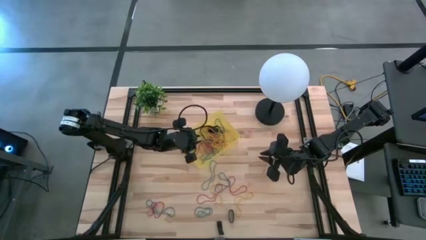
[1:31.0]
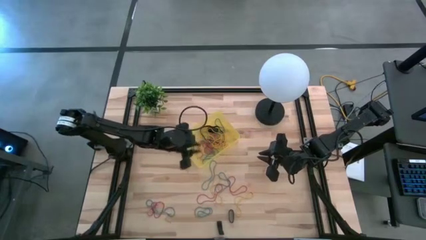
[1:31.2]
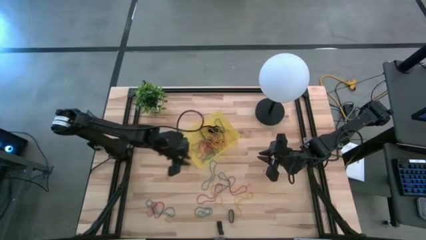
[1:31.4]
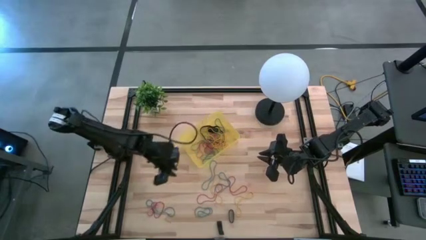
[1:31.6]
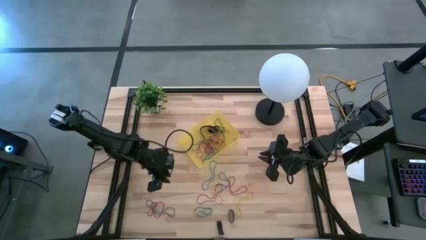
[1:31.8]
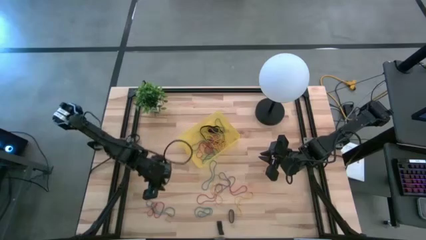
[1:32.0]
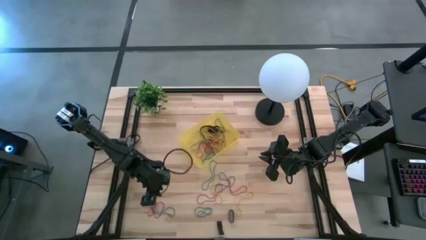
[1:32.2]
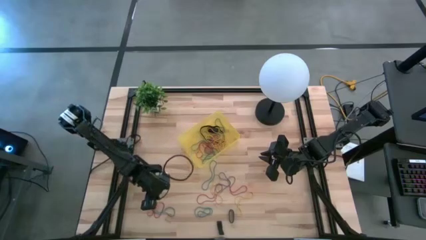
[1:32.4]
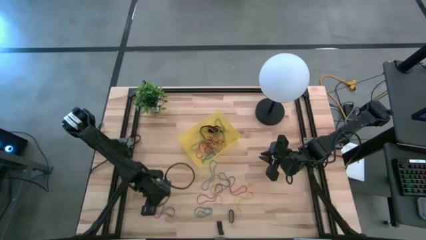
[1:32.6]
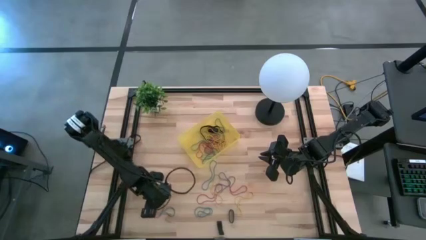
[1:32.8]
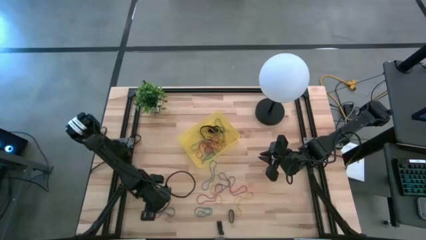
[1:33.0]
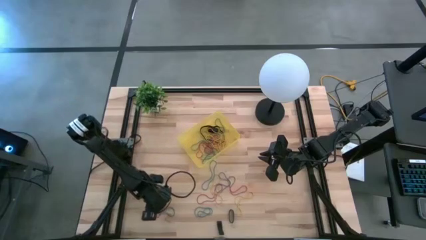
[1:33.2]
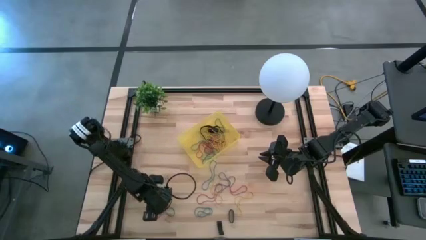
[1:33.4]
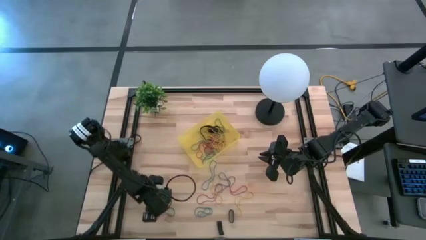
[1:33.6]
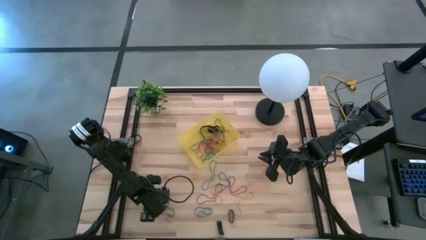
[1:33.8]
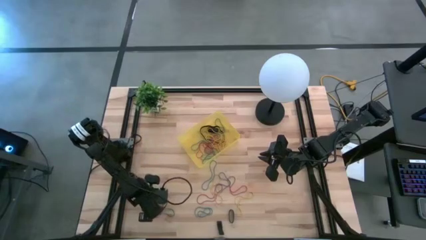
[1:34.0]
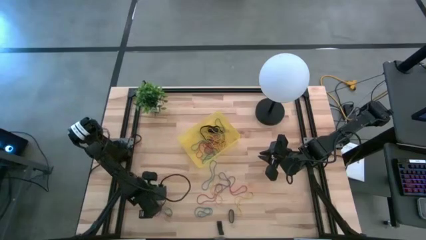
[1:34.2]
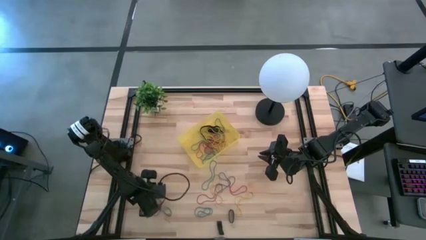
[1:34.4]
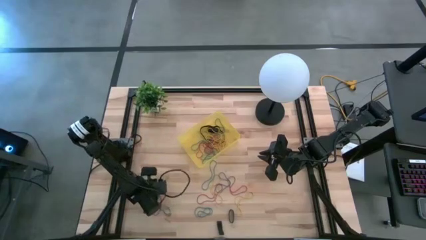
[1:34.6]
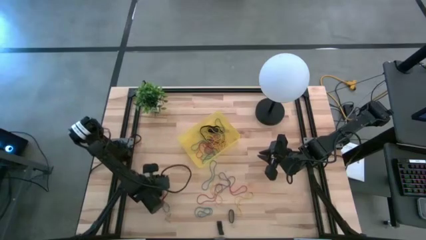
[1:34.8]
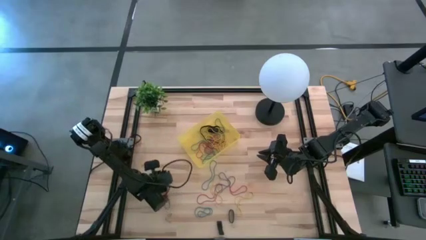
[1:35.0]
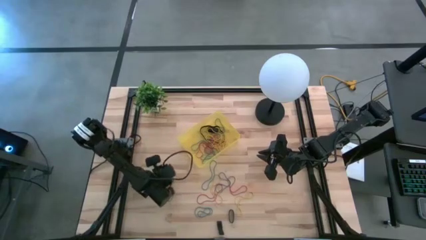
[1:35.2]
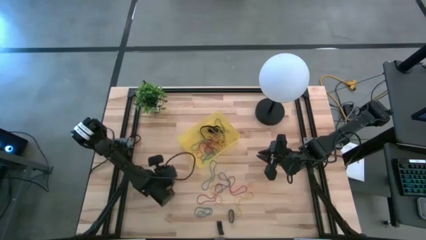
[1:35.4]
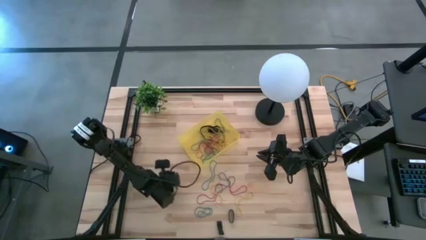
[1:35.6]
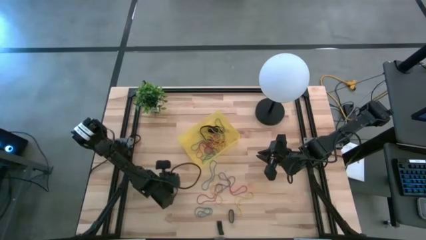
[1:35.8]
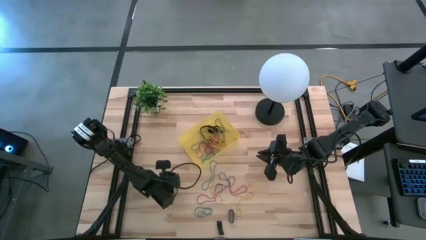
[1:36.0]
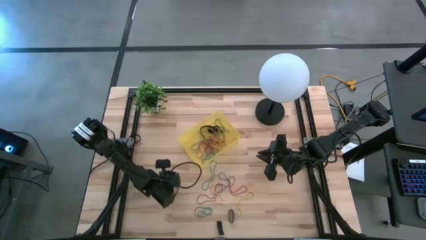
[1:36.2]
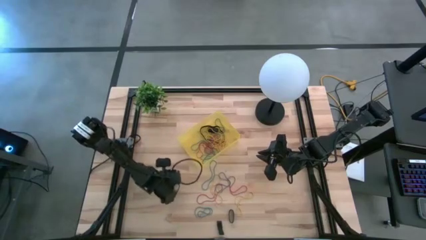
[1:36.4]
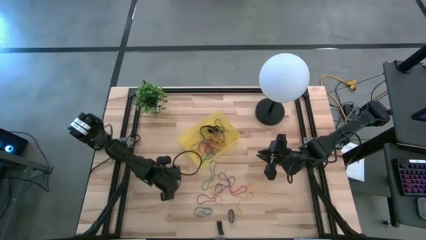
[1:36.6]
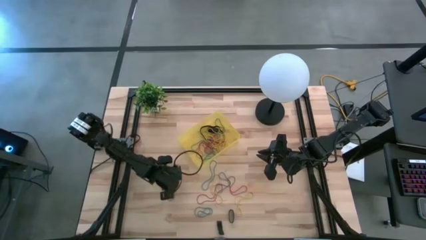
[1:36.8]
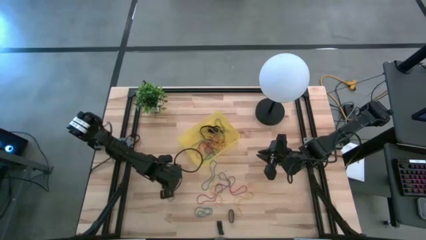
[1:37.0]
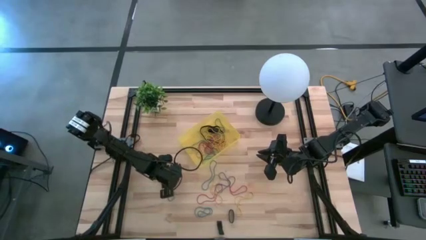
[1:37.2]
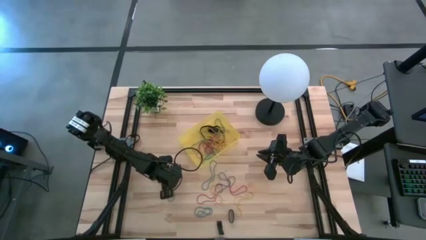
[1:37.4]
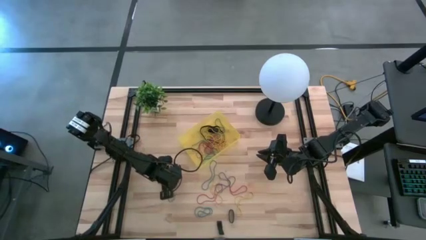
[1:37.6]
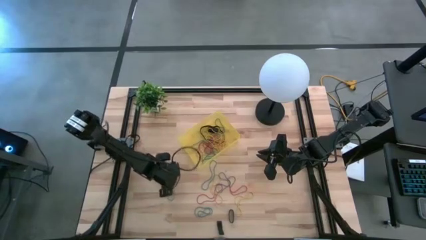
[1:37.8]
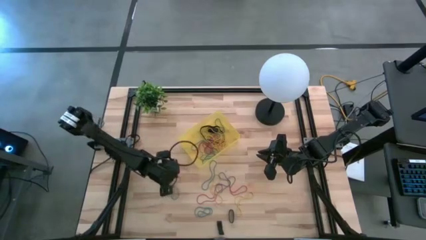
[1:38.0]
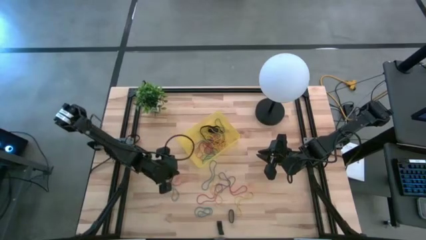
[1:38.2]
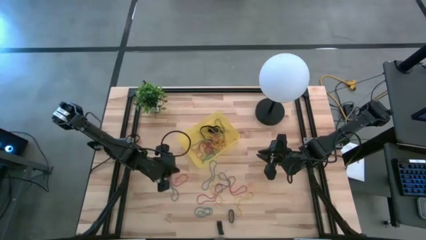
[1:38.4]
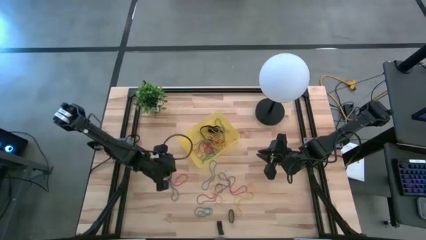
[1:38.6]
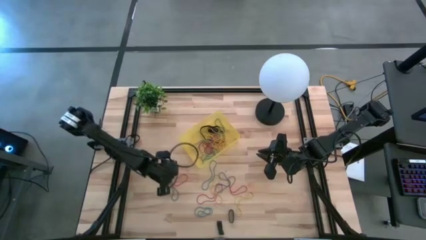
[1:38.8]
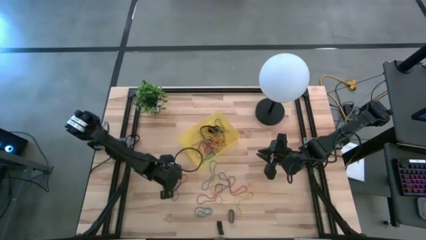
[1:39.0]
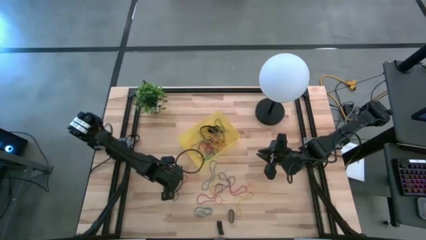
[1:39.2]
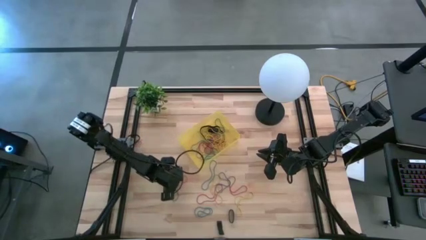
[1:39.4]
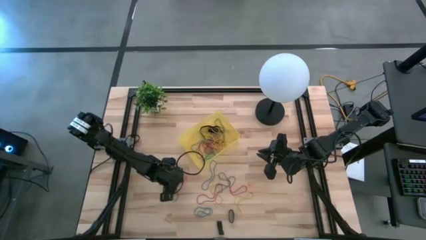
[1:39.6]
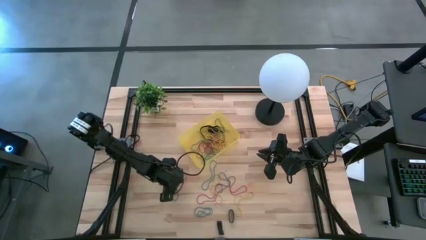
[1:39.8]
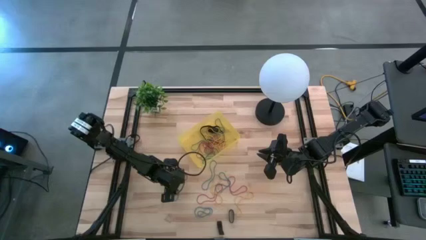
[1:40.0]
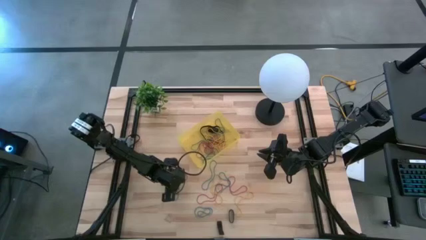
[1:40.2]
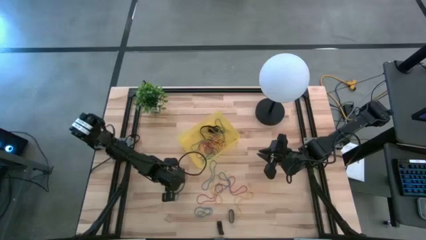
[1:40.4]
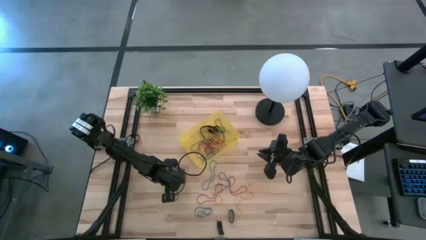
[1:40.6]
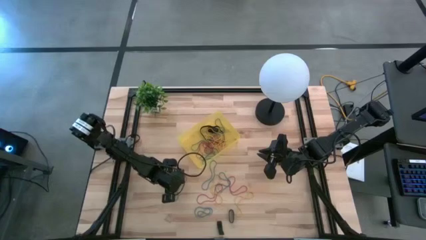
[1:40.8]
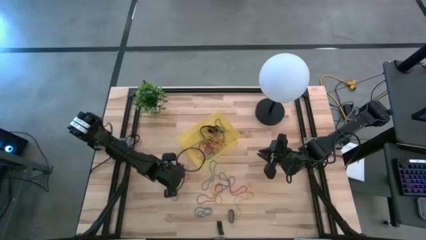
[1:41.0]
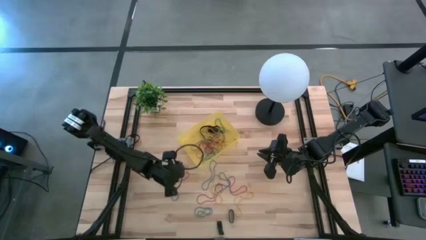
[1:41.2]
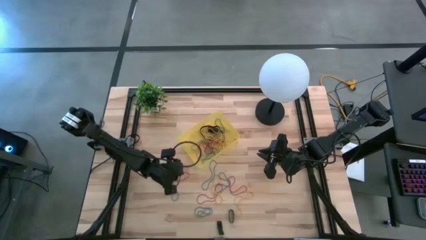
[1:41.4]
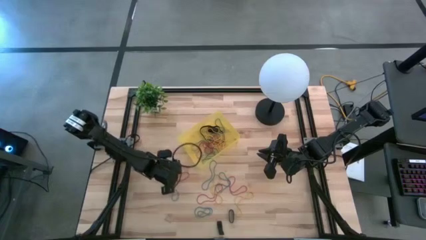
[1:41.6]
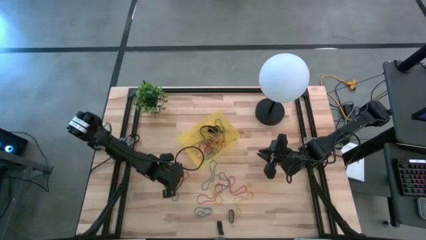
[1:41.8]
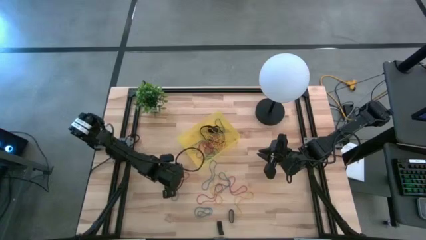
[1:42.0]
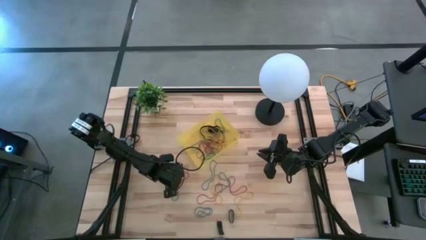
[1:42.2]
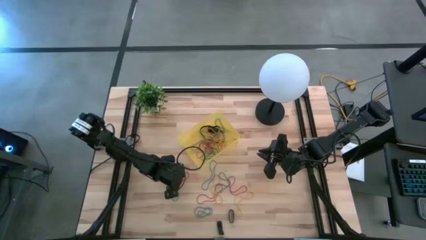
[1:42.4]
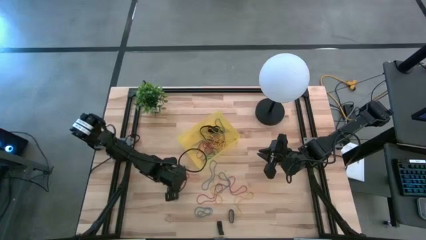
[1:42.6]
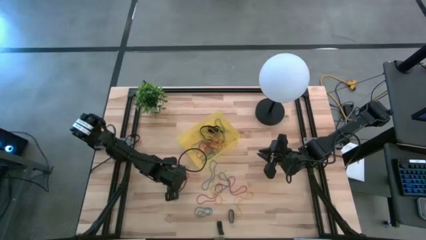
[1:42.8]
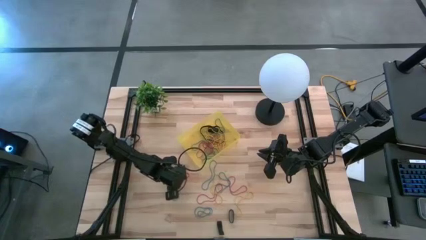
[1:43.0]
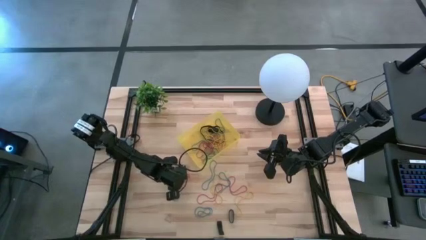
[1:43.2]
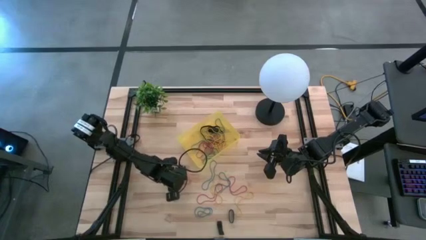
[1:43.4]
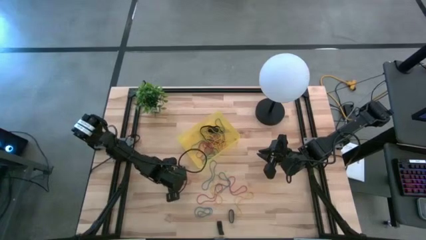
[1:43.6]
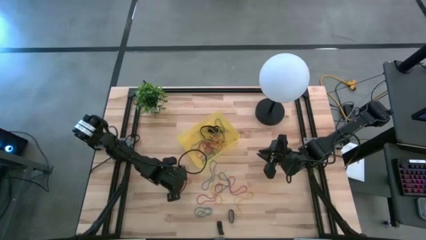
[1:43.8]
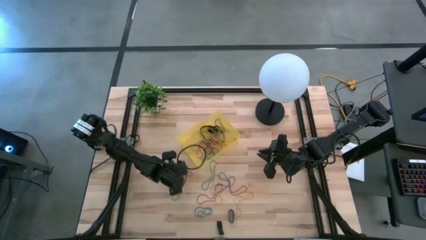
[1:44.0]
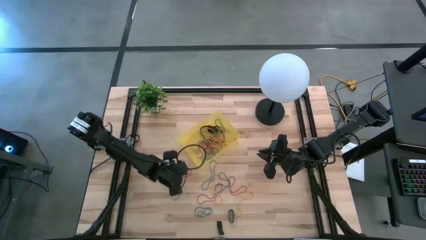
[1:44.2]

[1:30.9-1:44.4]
Task: Pick and place rubber bands into bin
Put the red rubber band into the yellow bin

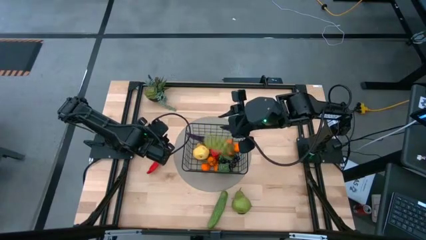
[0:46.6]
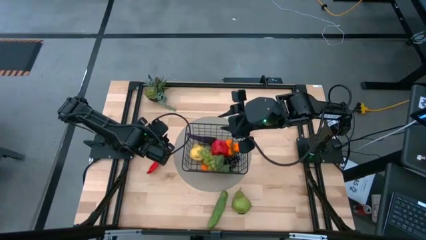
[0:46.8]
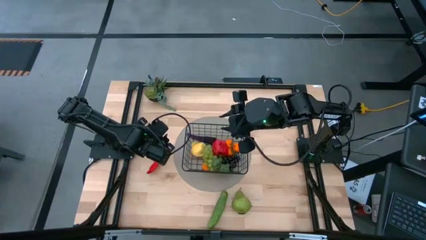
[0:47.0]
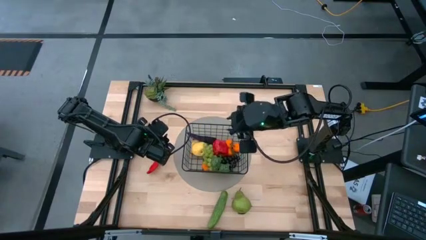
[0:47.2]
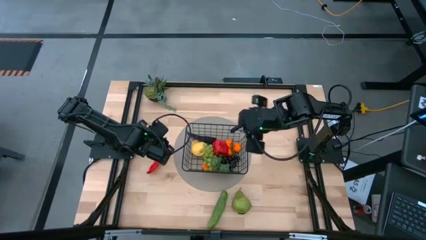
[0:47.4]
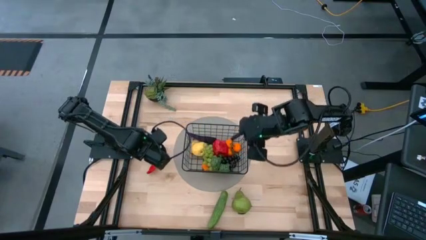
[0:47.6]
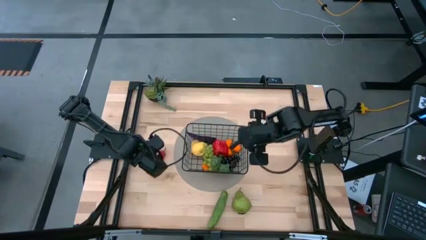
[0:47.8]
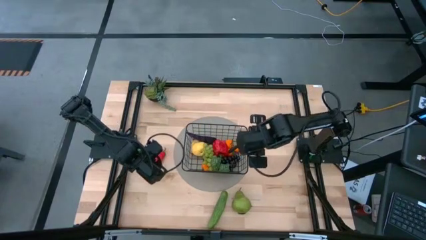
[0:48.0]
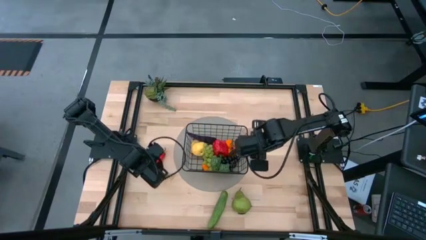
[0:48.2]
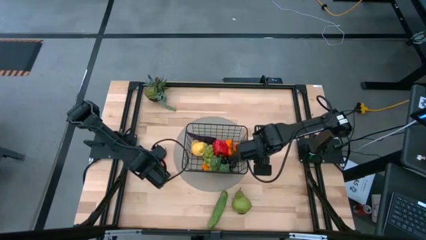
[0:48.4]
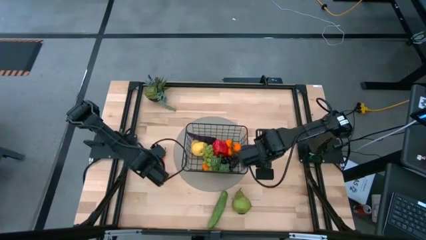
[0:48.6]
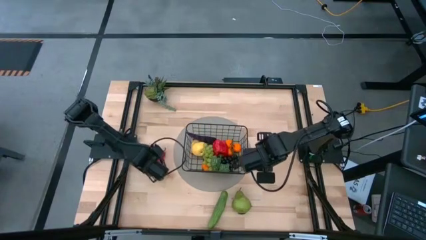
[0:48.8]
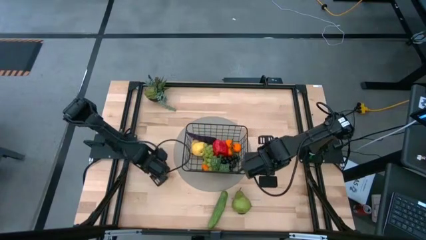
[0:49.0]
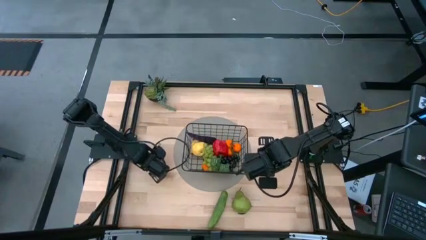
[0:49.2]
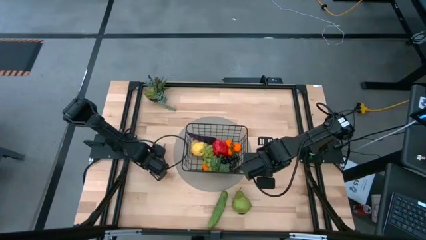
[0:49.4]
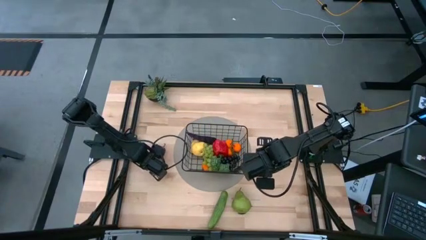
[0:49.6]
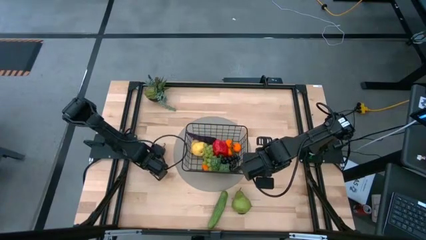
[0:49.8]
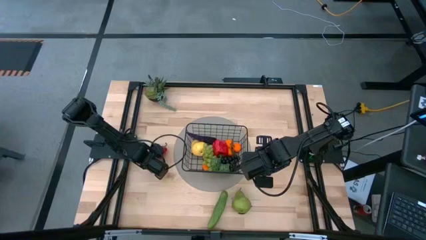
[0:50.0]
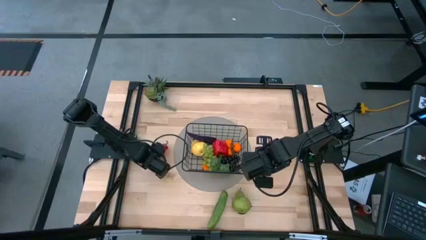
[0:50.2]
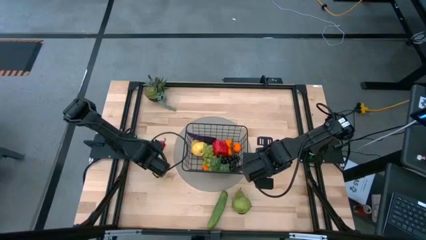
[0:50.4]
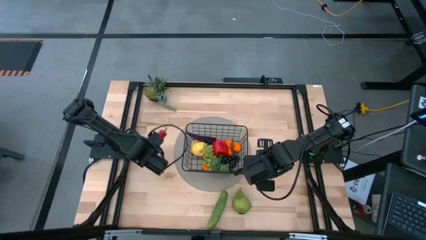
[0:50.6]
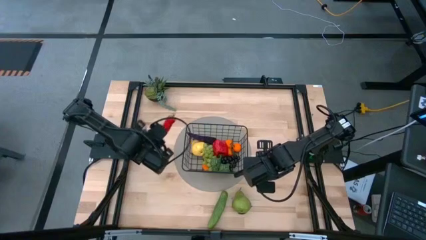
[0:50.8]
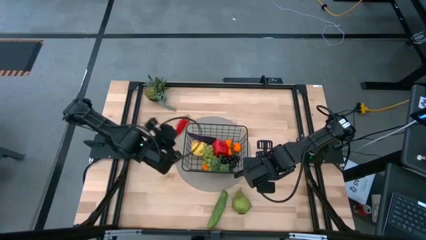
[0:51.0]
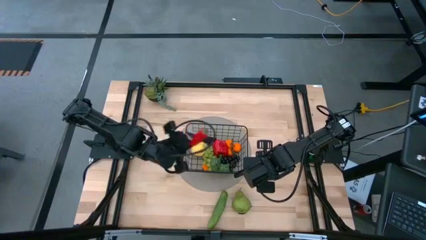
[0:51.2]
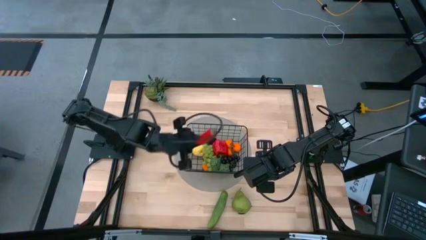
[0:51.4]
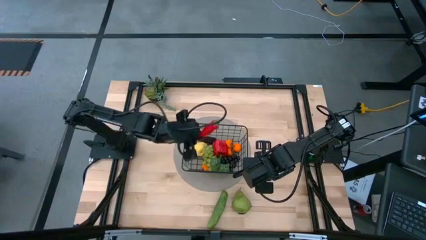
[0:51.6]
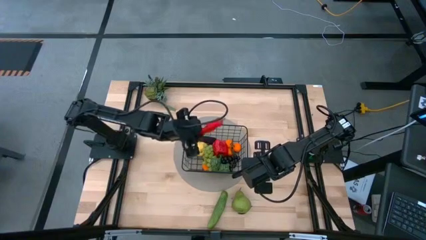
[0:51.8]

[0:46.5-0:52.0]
Task: Build produce basket
Put the red chili pepper into the black wire basket
